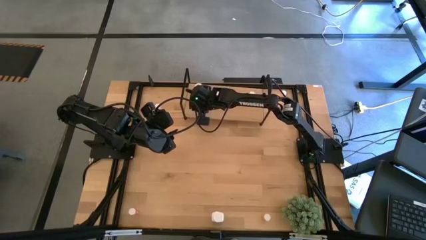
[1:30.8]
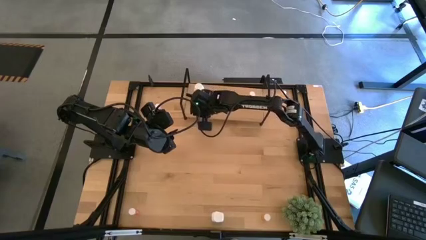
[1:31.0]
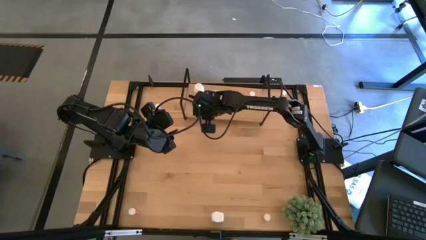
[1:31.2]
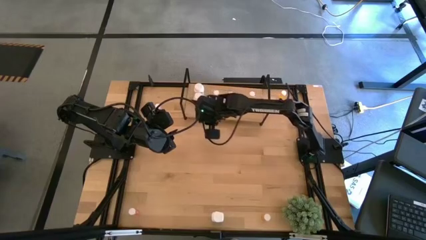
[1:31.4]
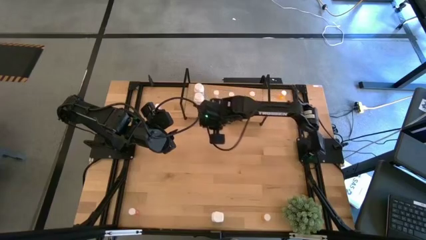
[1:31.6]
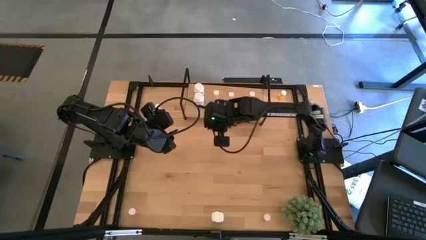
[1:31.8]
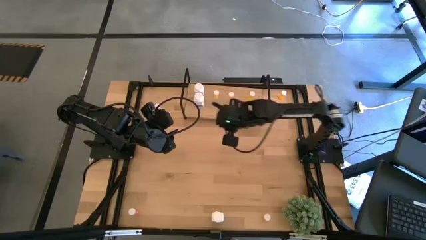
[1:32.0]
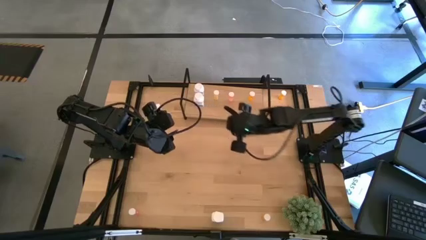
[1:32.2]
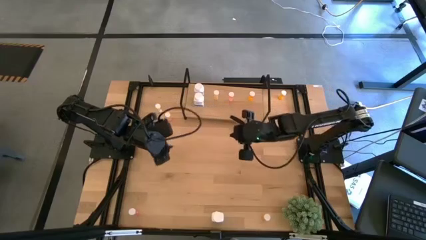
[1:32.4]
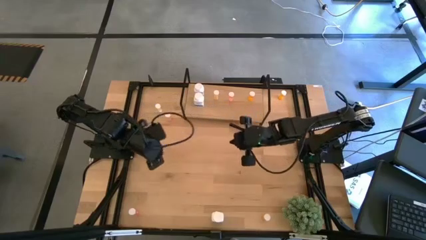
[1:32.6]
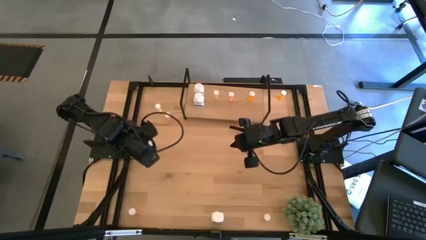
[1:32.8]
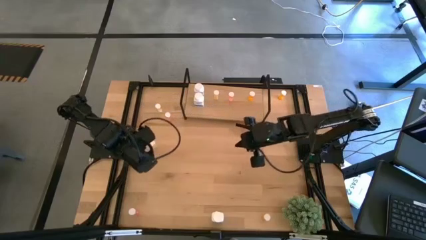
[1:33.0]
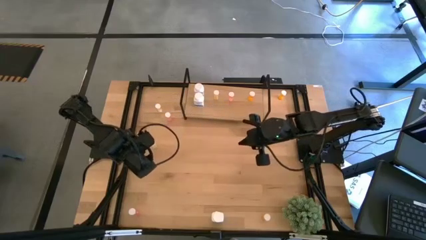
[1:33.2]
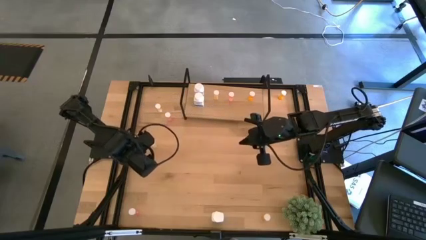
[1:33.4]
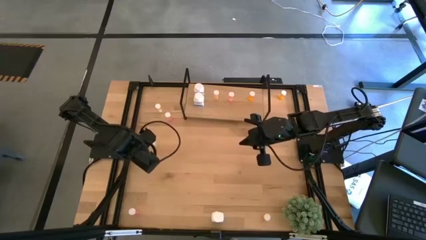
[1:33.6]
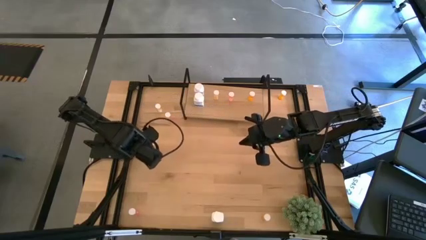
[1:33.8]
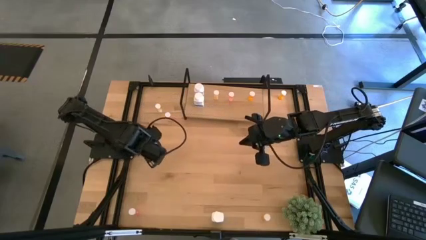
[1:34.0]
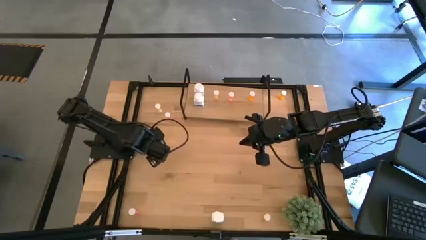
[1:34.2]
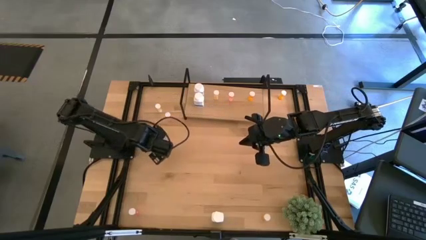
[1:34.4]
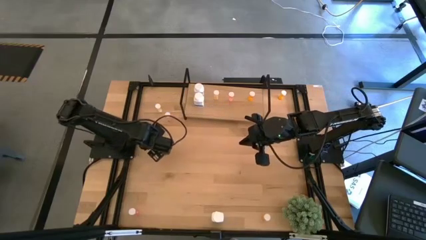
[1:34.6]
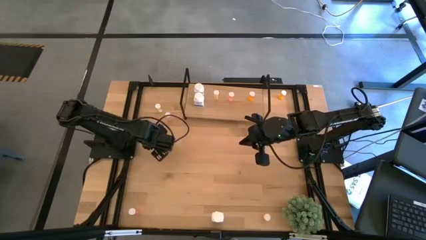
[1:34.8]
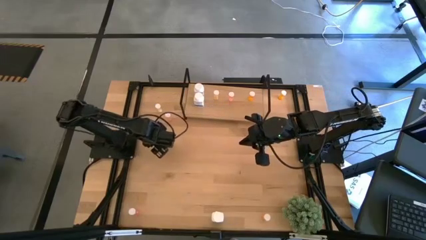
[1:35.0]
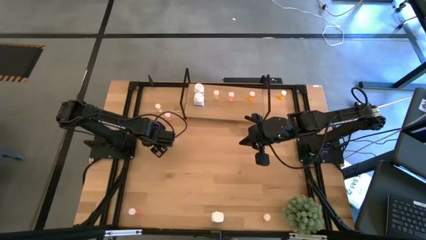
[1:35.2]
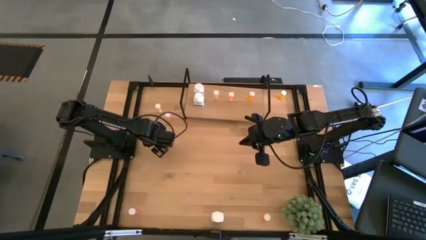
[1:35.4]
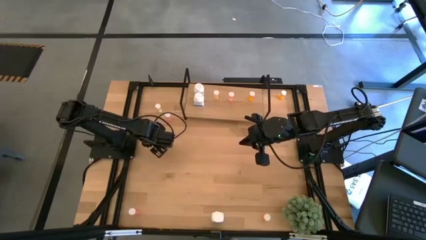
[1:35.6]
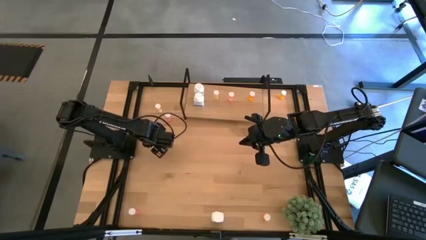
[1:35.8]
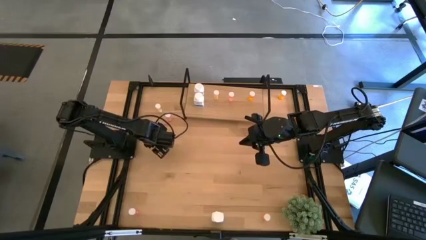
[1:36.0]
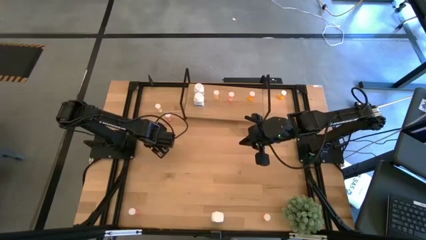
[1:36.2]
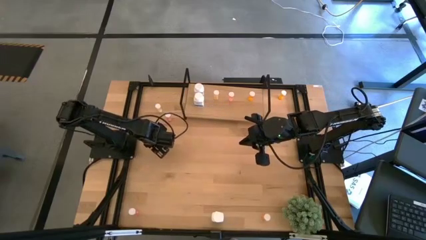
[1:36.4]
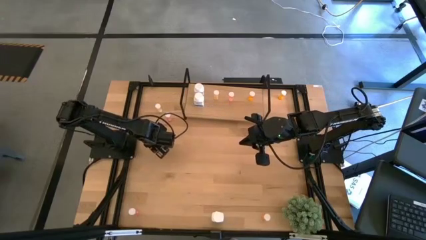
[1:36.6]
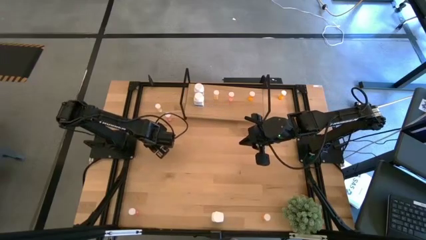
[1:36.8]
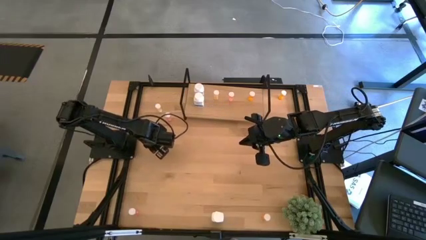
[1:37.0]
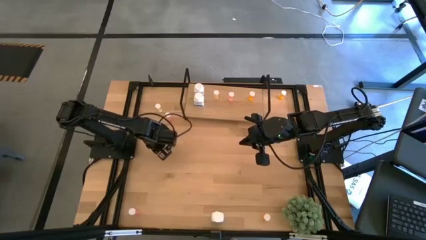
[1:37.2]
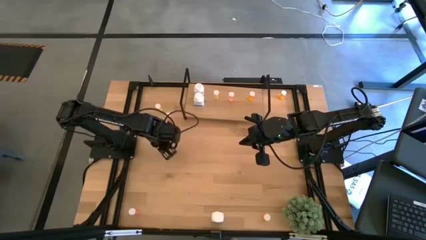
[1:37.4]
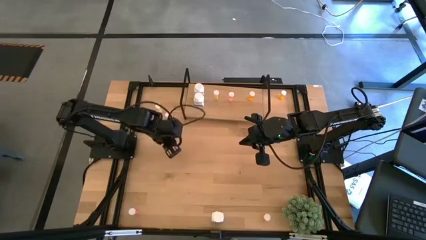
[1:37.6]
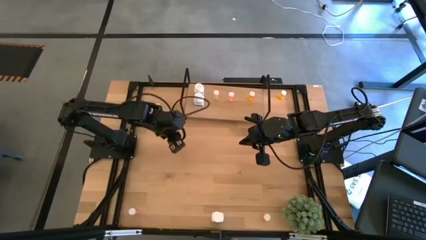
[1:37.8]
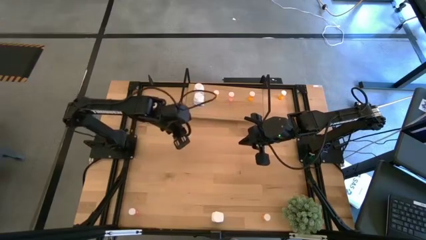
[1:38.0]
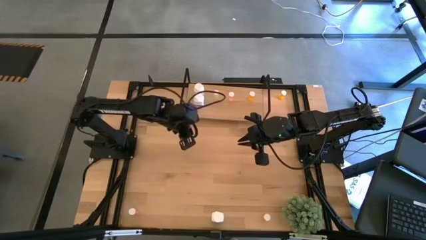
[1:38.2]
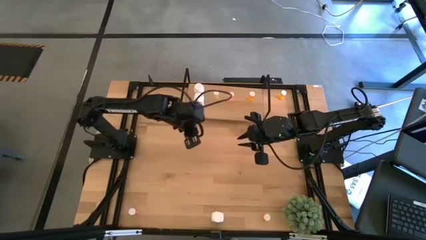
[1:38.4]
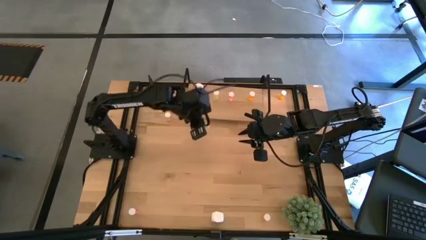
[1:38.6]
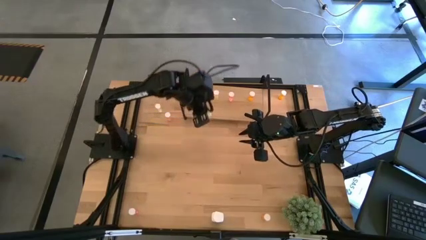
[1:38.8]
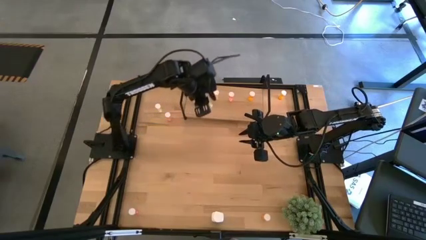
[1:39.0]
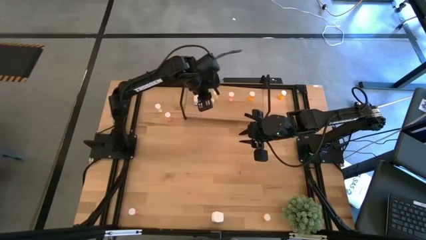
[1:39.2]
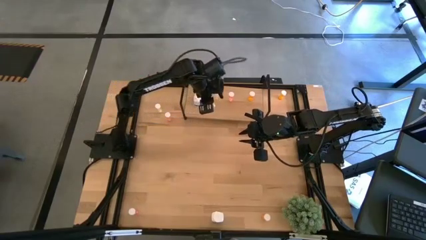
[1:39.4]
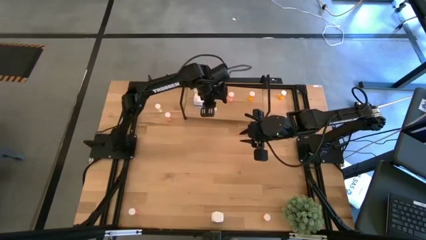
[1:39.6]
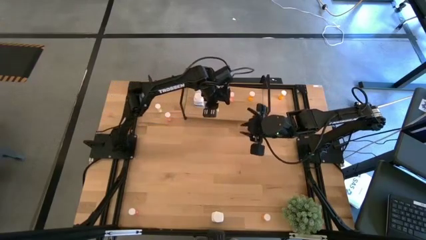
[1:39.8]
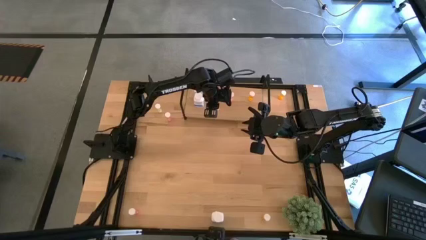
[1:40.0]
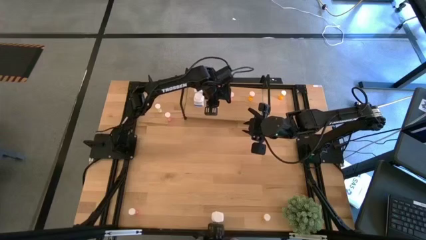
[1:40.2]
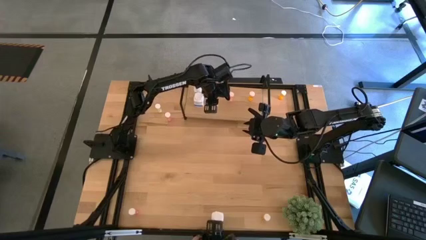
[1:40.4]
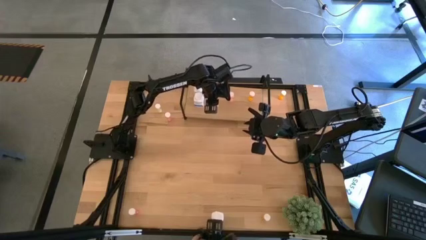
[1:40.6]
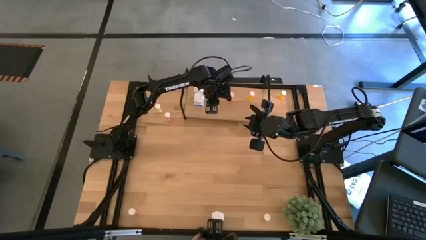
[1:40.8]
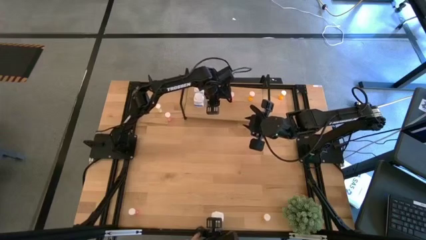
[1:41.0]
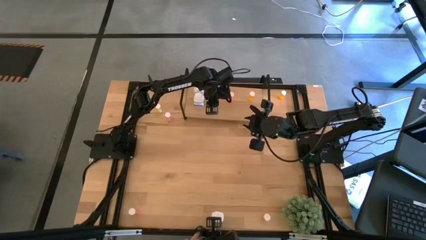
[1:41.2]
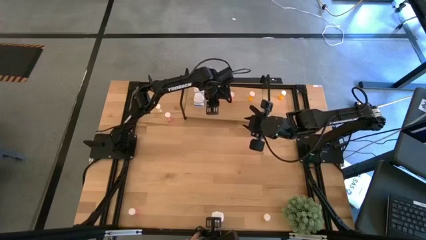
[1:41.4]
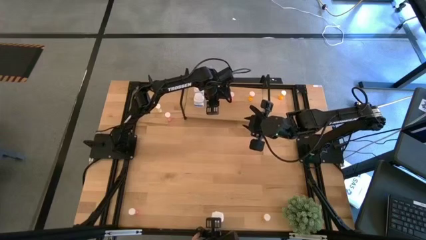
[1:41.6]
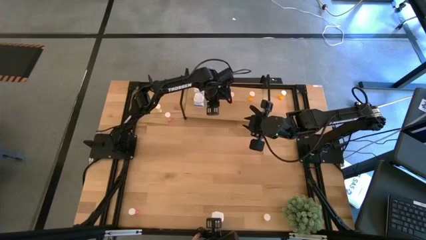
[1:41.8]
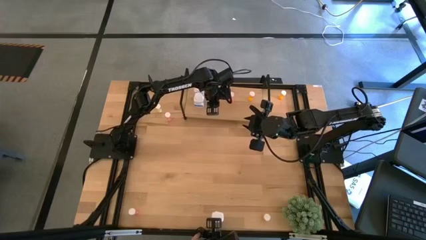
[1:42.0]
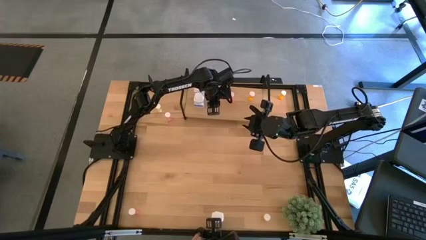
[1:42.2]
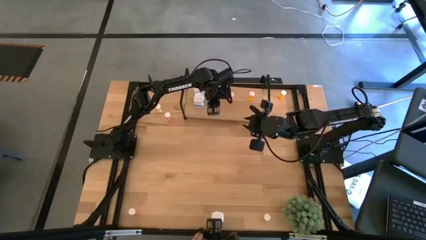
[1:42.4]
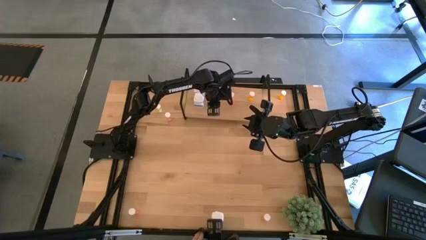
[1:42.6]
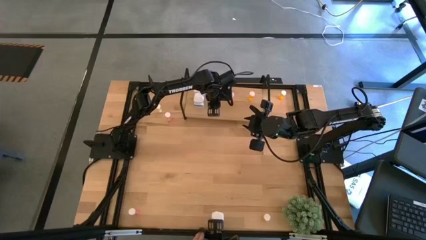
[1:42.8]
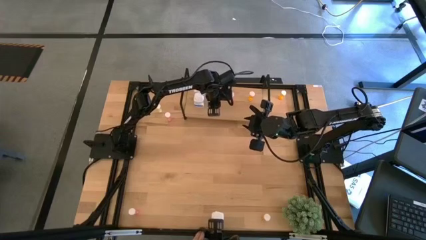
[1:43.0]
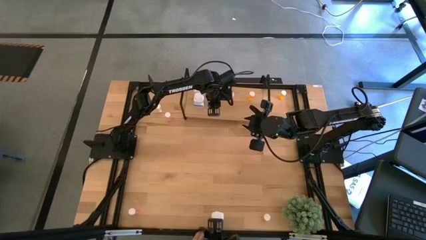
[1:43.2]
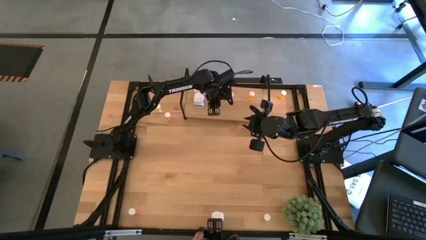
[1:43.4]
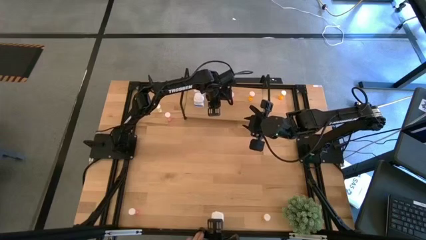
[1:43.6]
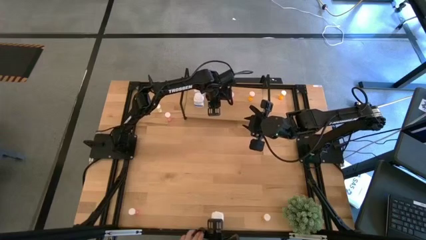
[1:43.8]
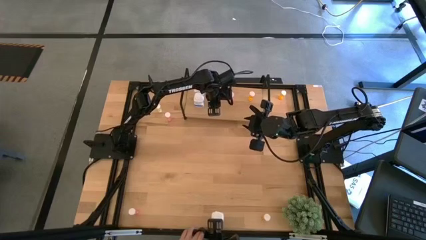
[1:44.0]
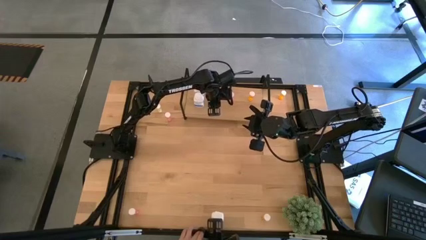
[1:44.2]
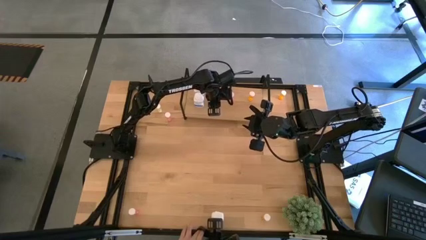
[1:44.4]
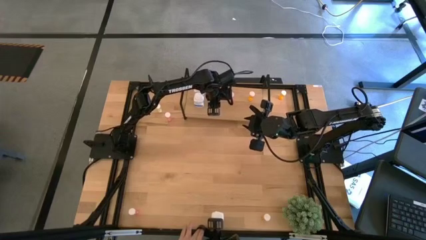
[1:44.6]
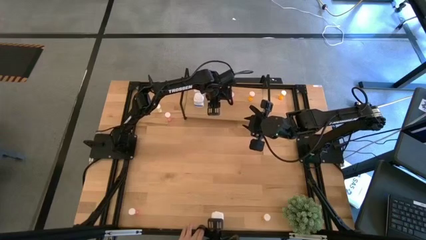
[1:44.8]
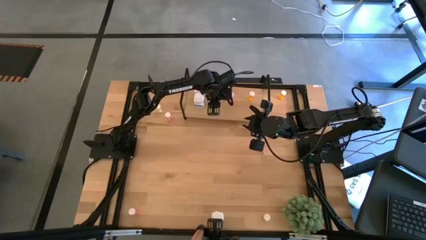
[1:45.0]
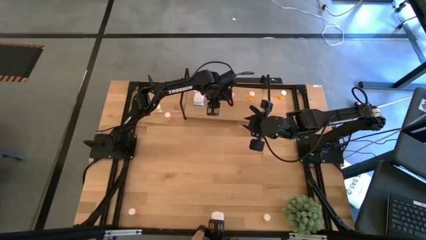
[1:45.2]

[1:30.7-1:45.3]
Task: Pick and place medicine bottles onto shelf by color
Put the bottom yellow pill bottle on the shelf aligned with the other yellow pill bottle
